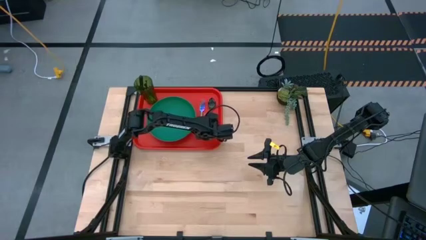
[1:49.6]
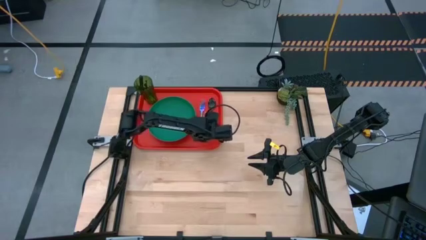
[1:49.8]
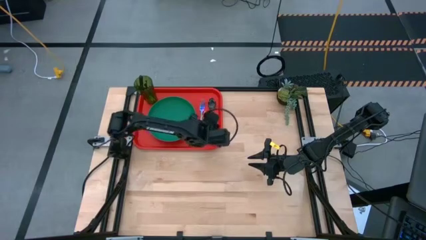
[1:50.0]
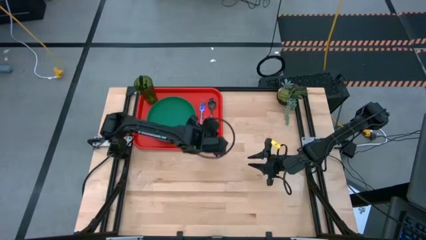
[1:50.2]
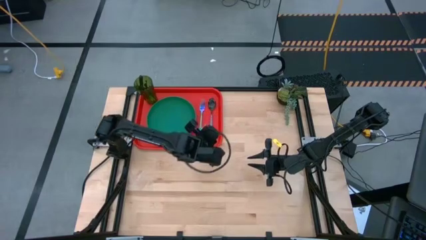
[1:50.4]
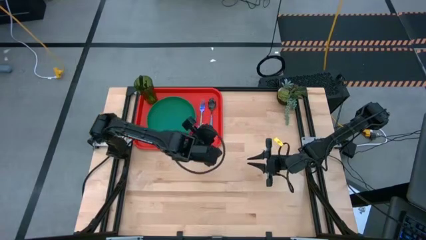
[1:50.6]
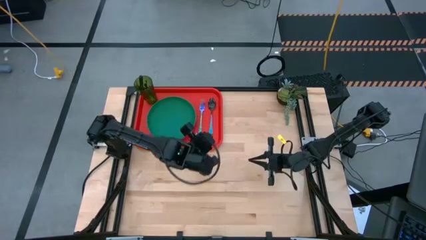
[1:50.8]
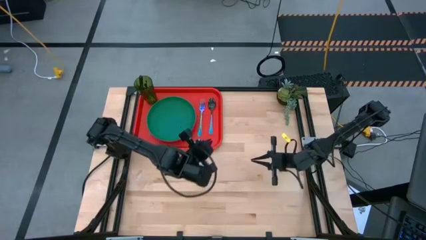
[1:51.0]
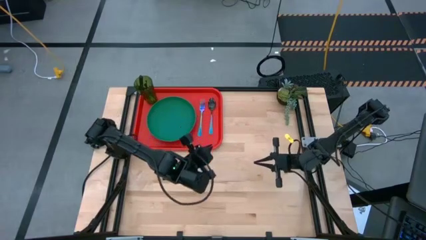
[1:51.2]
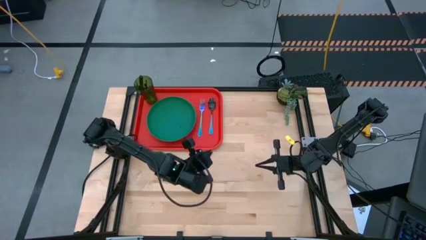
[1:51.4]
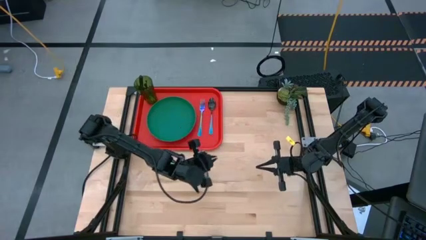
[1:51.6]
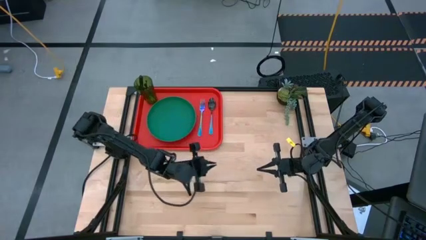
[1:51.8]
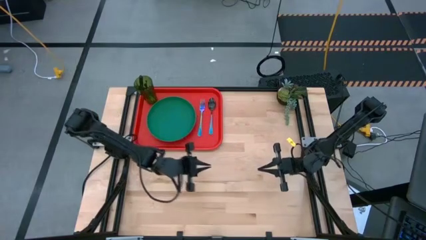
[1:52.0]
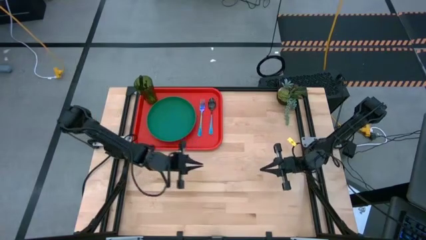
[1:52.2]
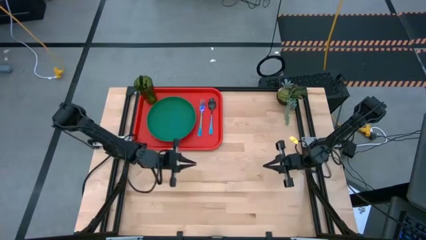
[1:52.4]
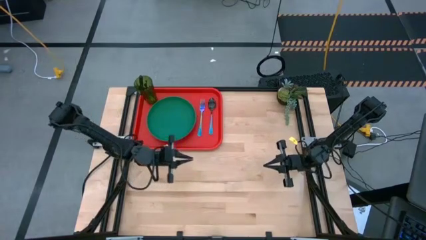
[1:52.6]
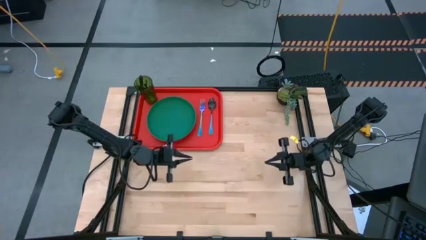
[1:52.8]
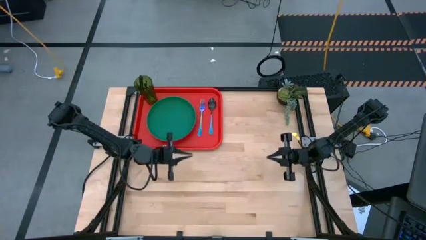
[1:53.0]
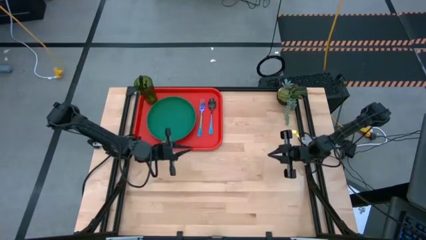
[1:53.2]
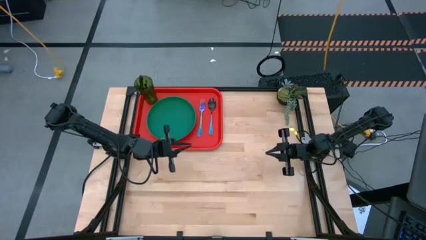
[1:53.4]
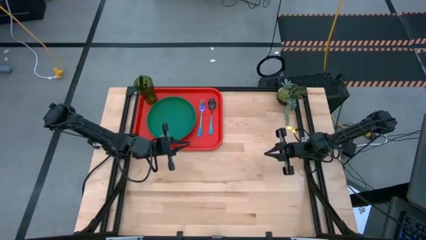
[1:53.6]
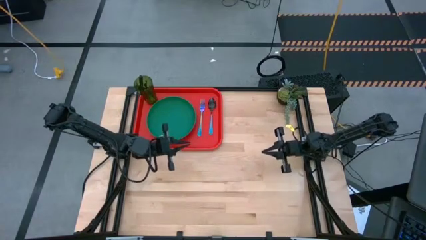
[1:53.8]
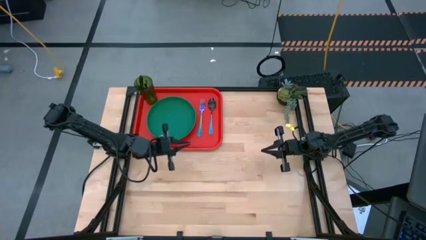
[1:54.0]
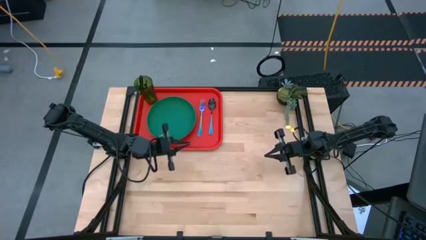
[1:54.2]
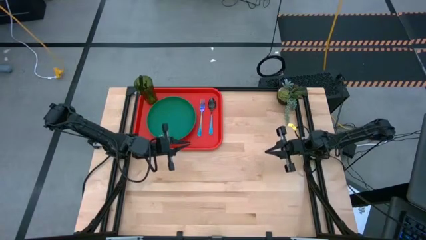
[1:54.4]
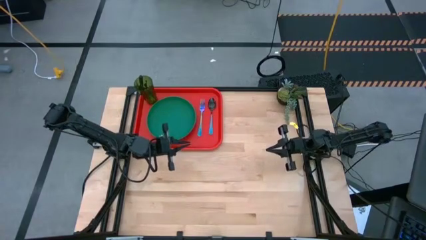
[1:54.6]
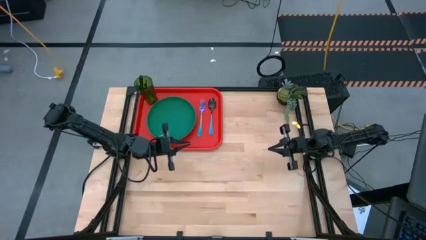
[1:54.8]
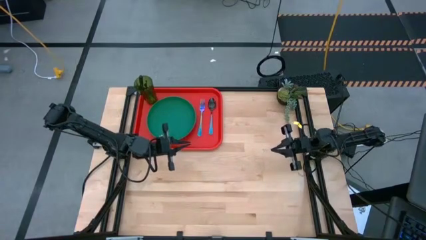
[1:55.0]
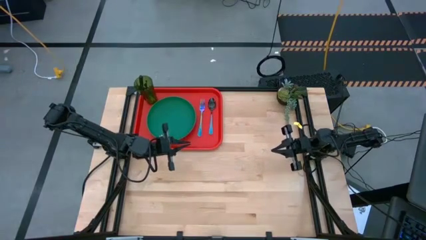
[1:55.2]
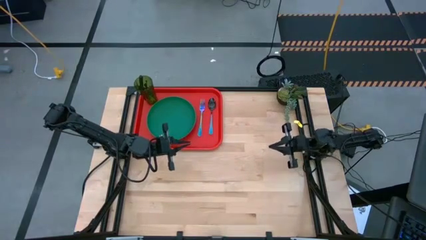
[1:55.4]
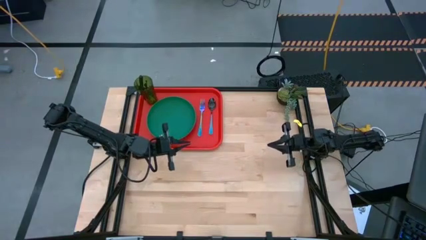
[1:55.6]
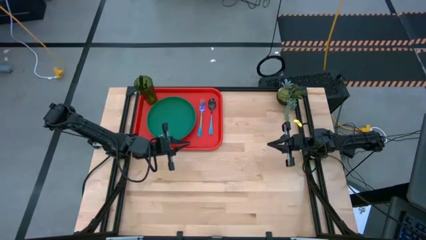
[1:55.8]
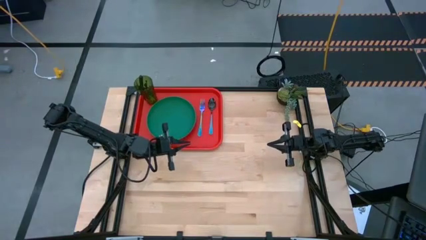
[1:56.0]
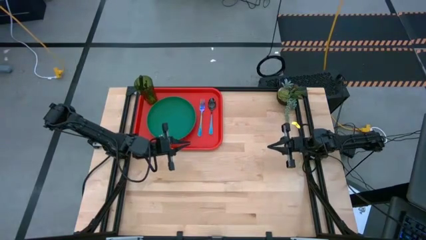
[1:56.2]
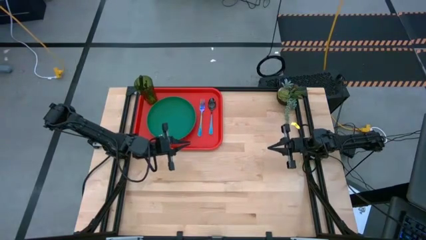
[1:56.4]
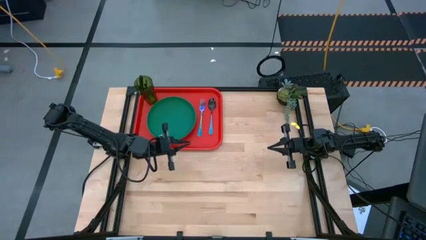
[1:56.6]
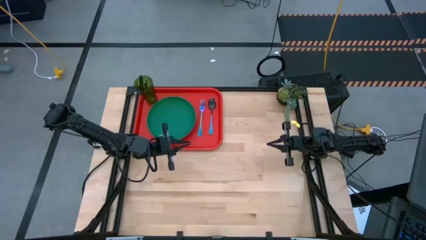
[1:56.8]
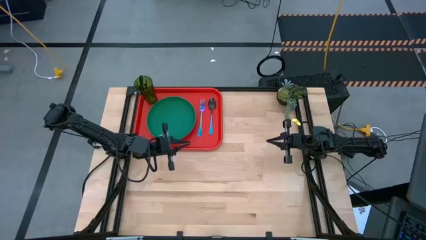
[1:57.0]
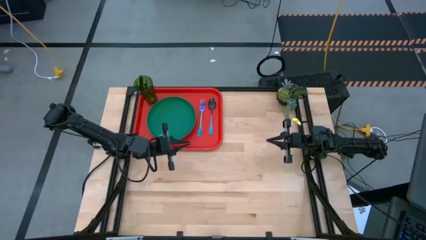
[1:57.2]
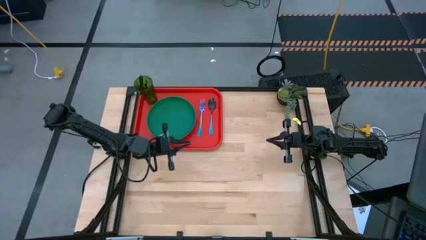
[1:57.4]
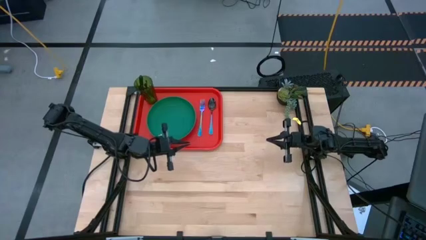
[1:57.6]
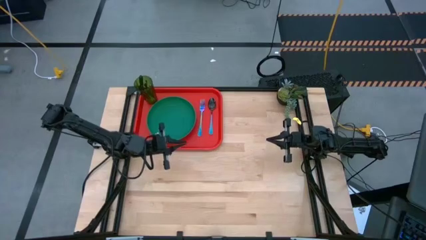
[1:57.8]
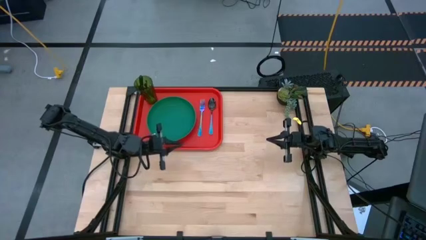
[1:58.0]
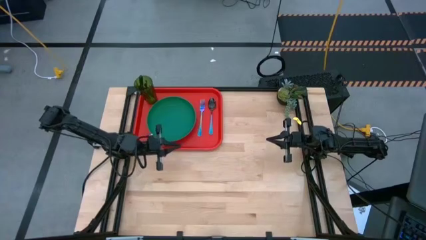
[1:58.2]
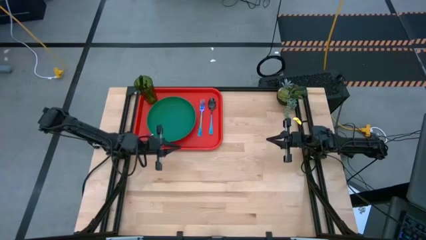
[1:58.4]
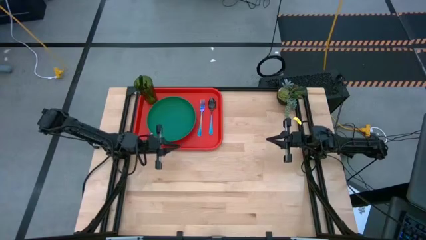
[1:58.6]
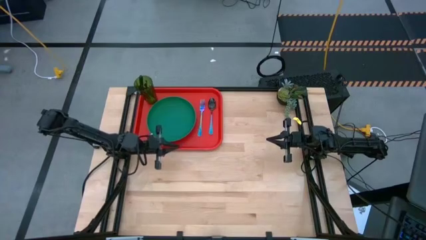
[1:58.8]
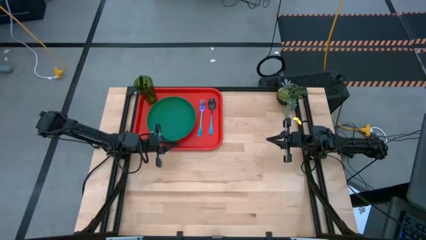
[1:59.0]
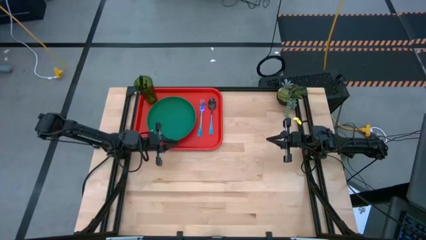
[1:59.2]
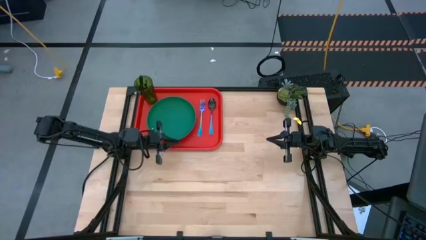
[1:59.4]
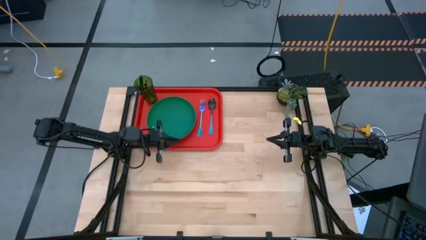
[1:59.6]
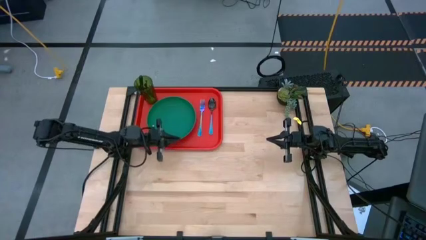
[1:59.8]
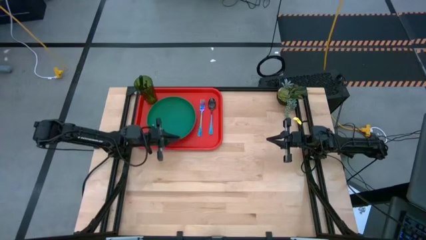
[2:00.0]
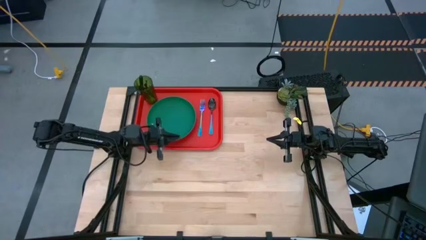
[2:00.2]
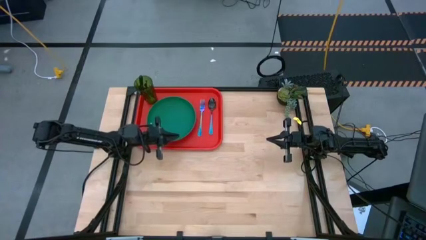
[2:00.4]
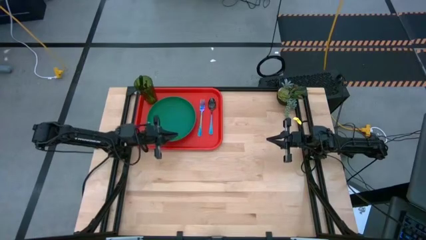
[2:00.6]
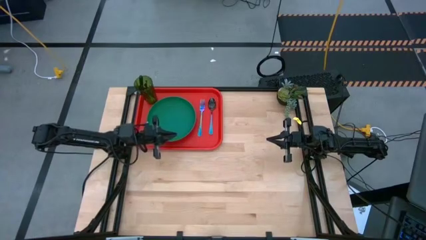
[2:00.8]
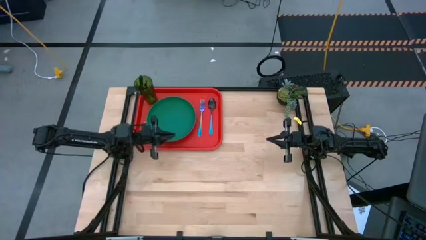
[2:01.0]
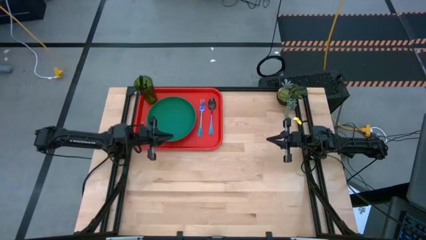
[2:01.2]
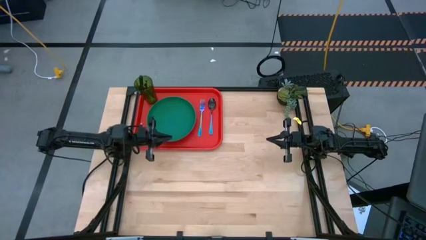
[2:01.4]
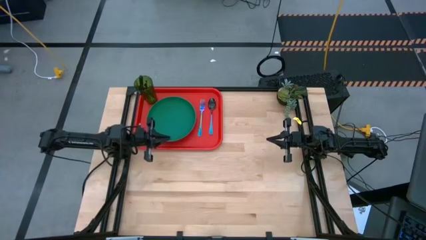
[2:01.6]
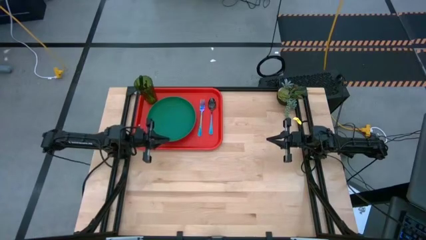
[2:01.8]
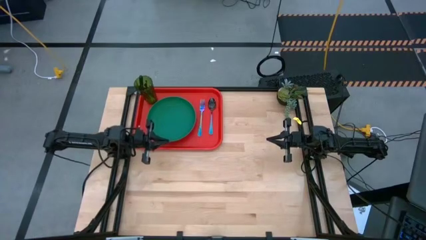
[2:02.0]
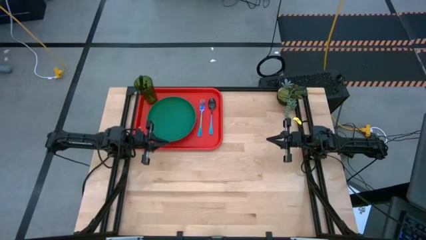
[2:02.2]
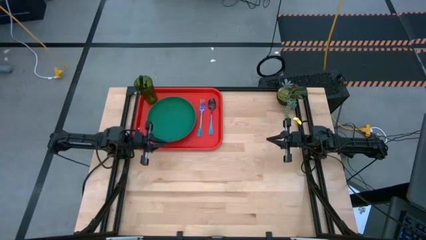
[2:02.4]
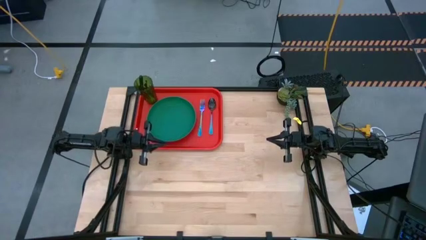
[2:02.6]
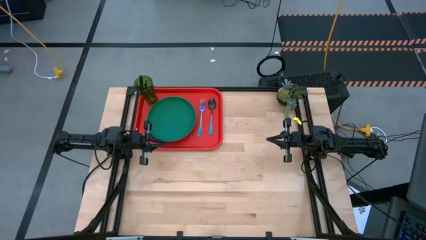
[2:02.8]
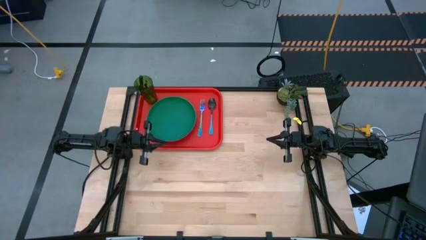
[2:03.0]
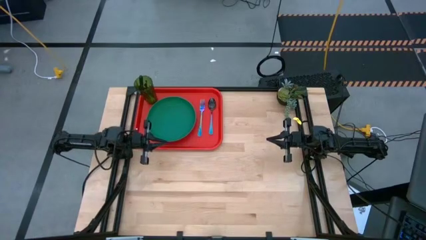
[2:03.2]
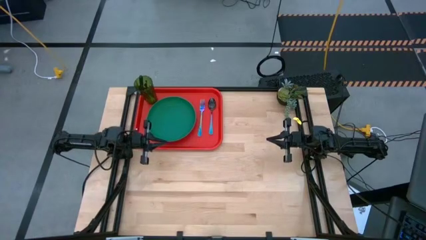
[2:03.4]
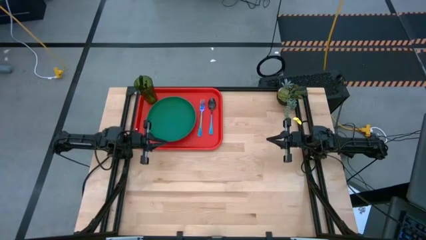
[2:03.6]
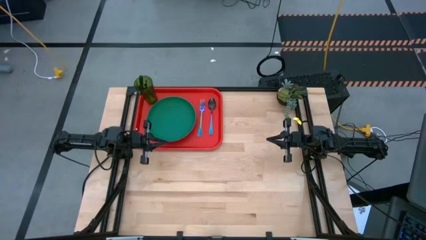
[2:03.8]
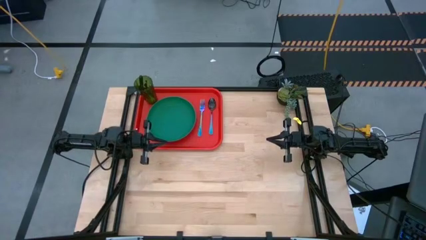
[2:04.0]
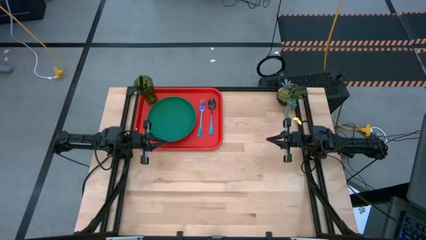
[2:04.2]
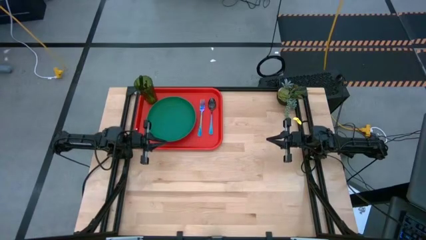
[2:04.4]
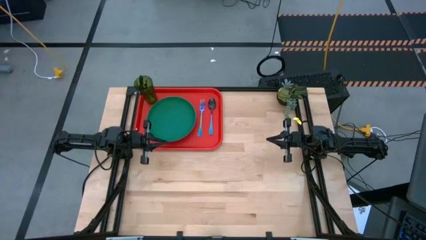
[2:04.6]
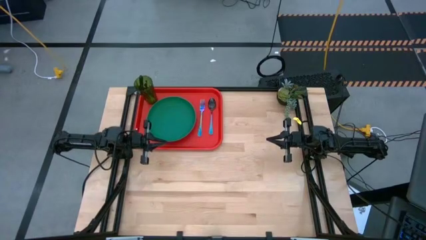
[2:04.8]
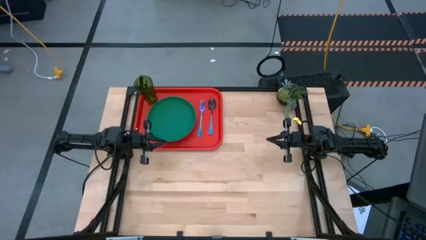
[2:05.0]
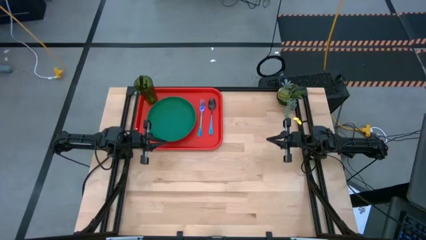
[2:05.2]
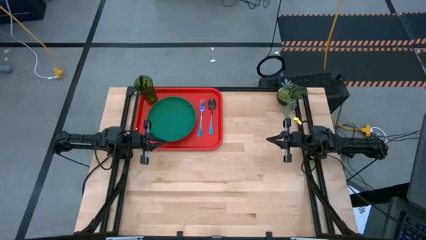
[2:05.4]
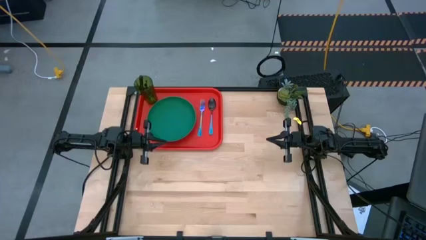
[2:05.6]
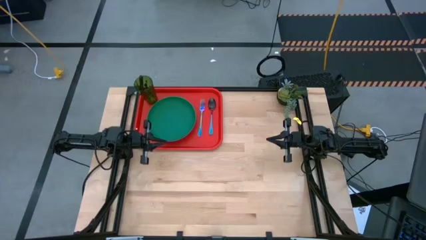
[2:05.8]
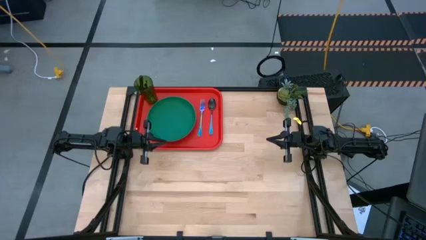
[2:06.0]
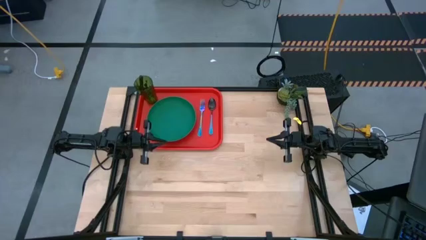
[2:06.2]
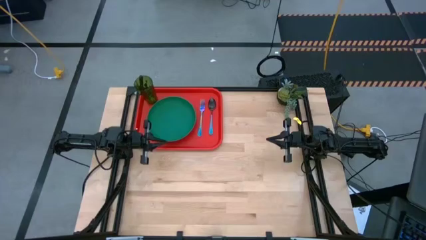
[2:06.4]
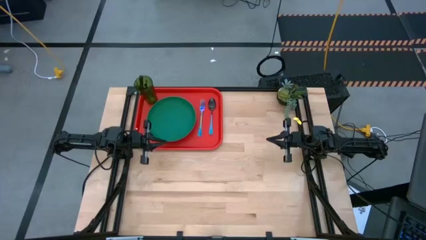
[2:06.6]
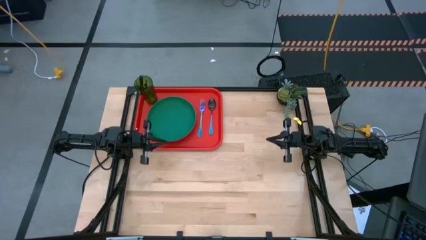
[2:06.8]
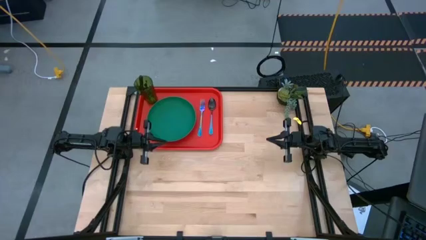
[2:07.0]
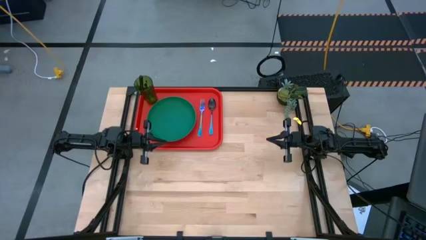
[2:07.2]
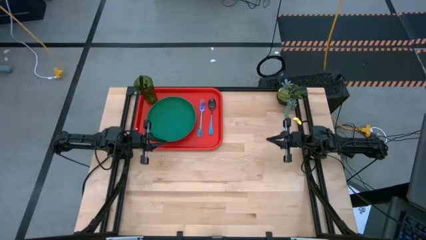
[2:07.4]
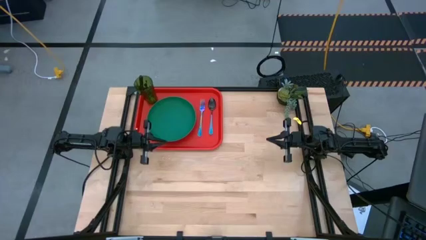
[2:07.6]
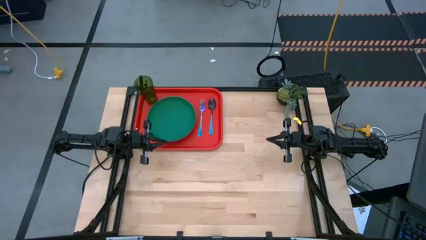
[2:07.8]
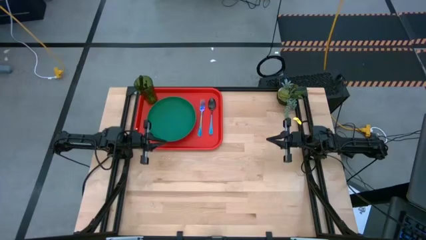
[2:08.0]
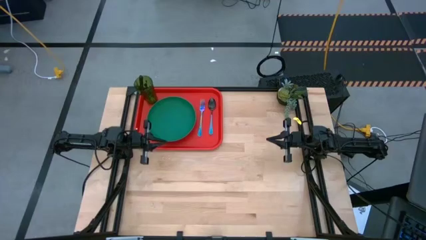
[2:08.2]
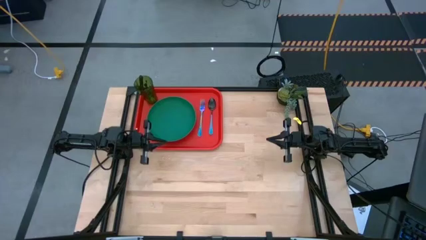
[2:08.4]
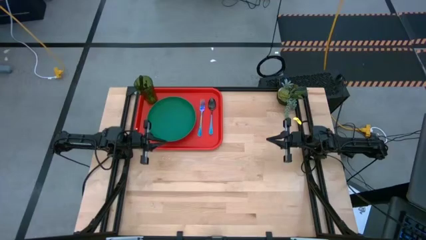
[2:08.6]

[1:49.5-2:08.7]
Task: Pick and place plate/cup/fork/spoon on tray
Return to Home Position
